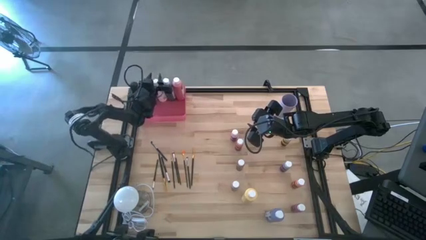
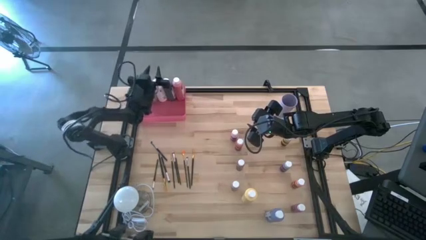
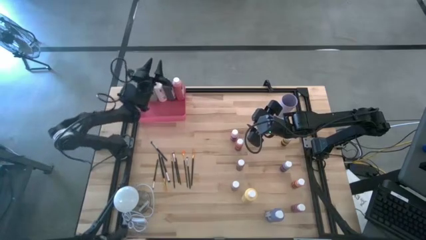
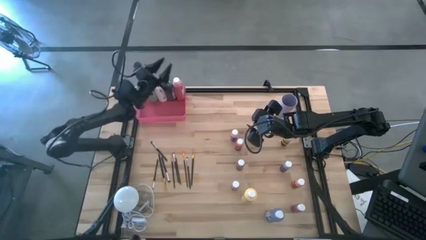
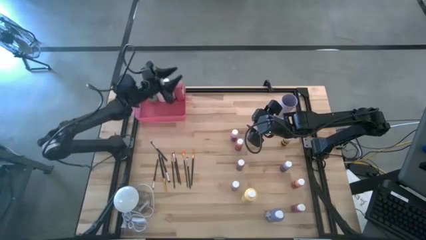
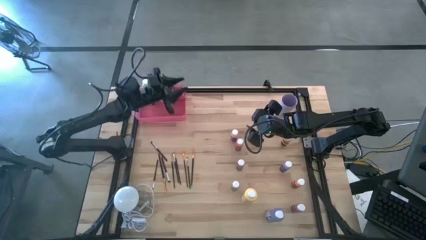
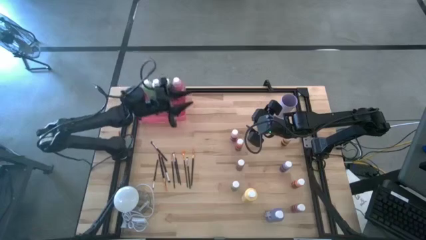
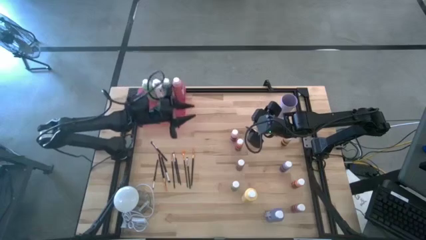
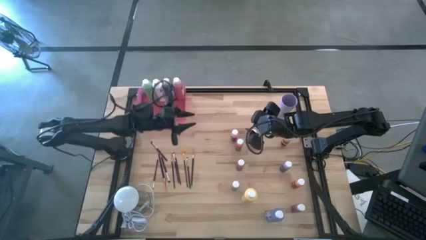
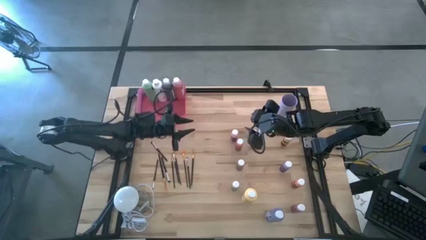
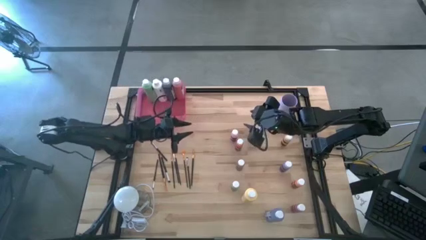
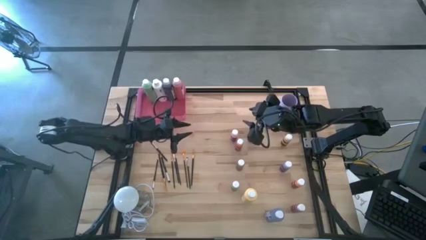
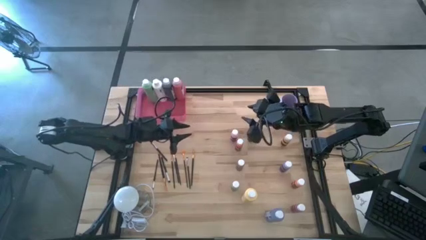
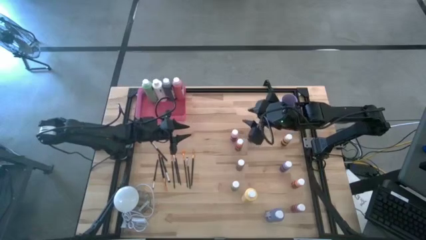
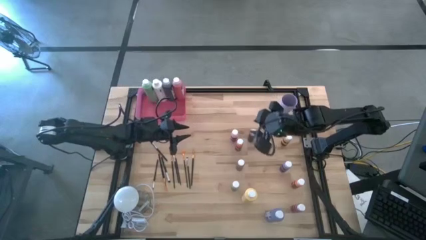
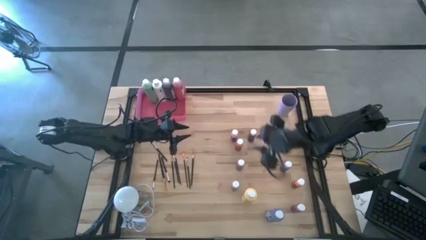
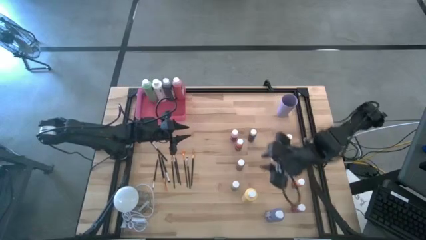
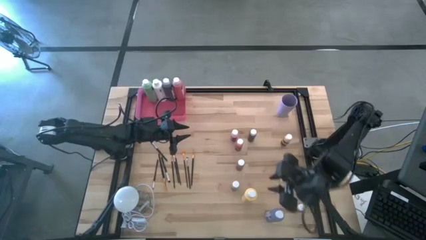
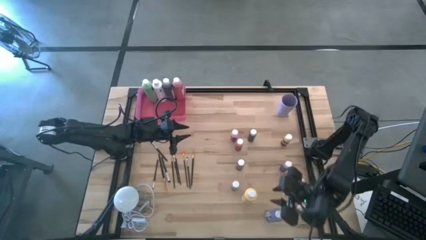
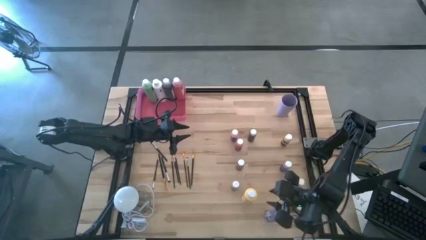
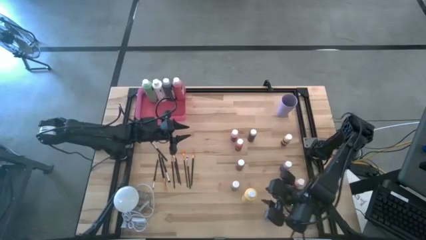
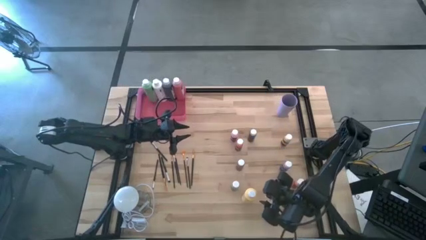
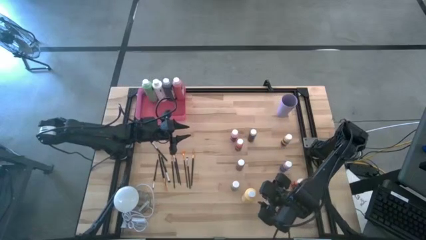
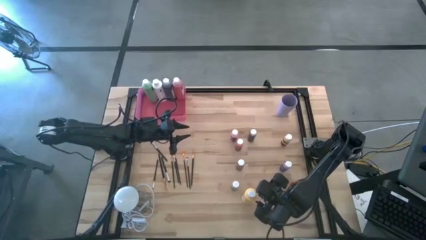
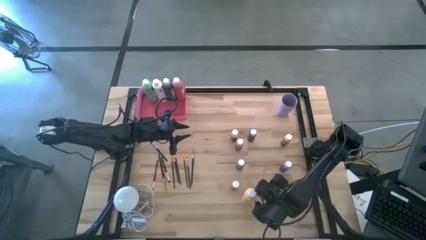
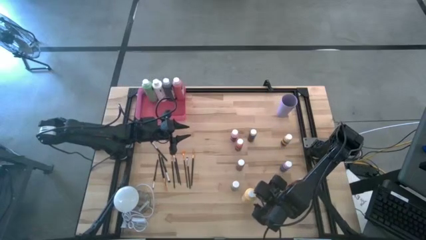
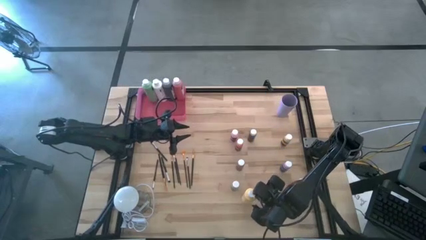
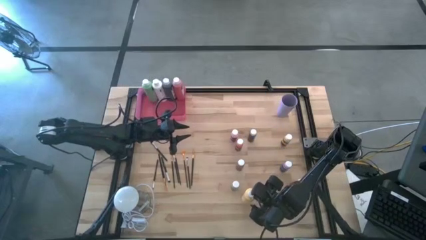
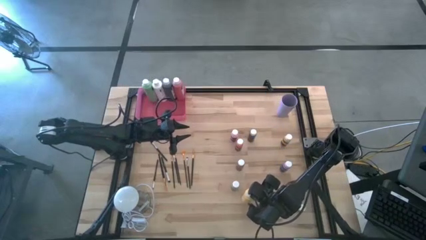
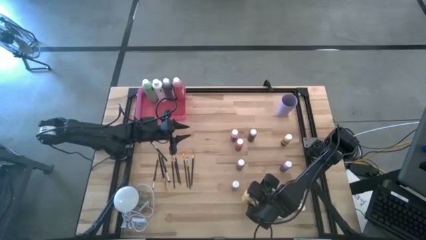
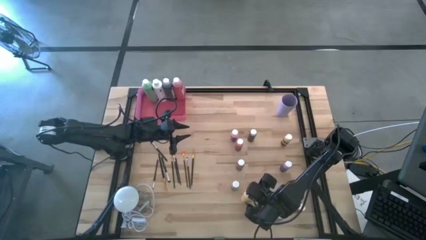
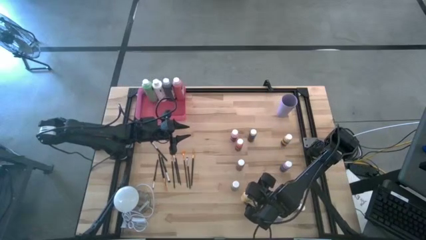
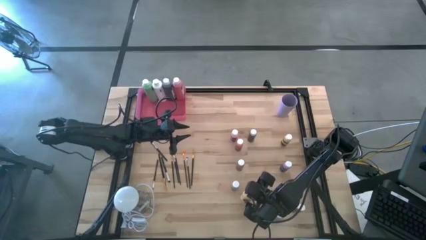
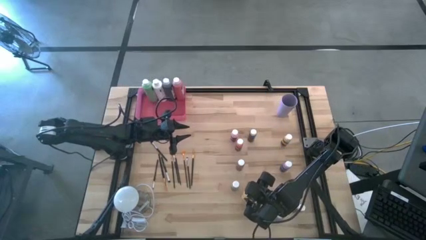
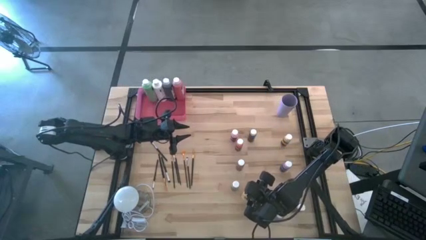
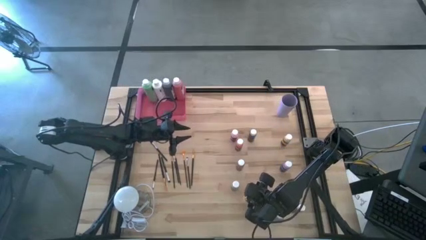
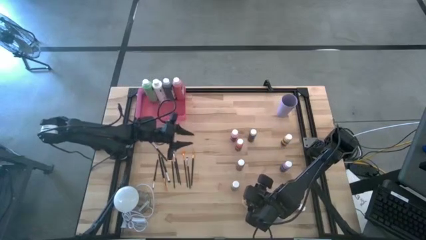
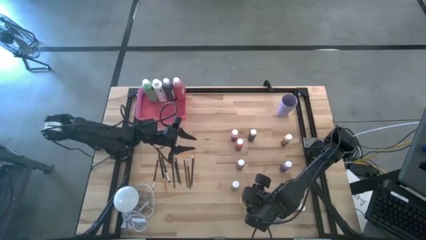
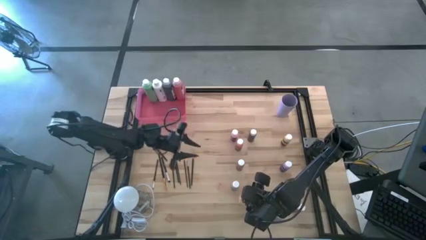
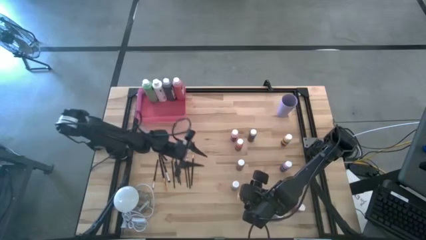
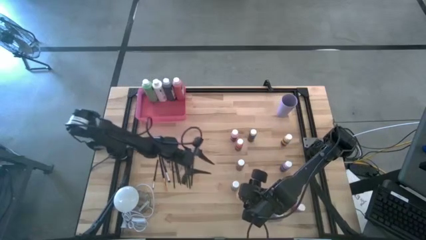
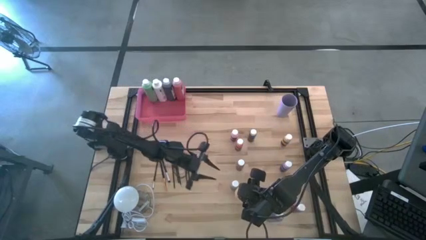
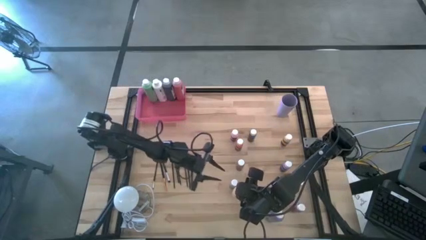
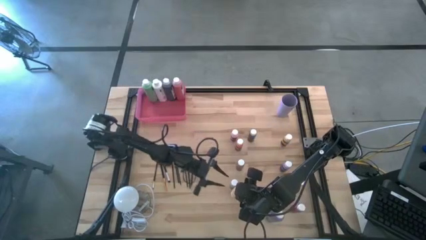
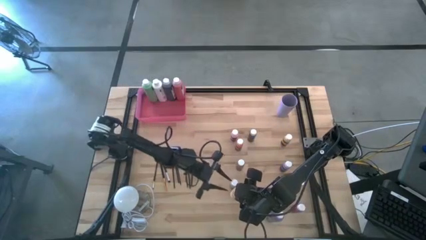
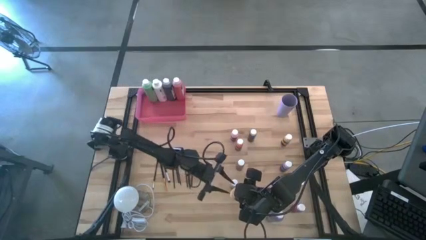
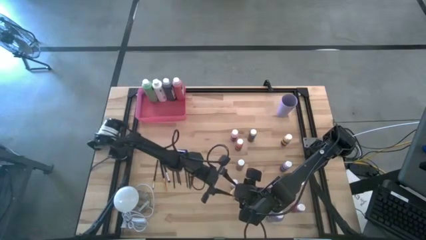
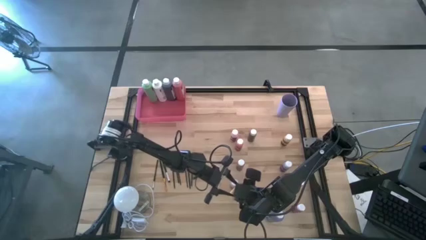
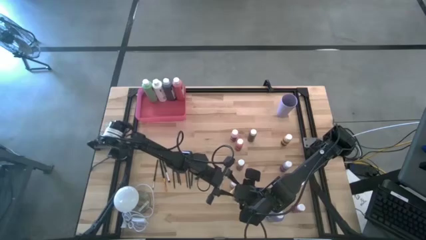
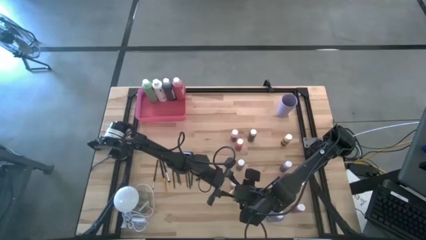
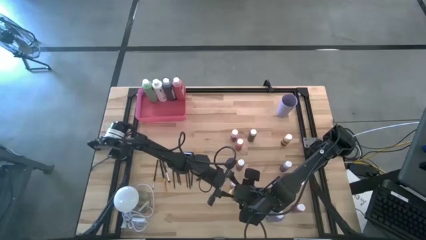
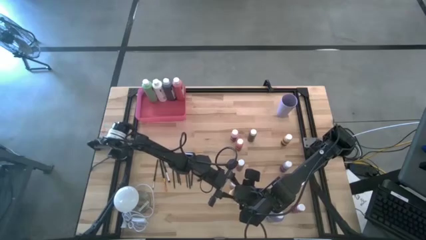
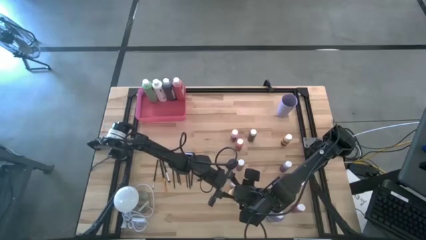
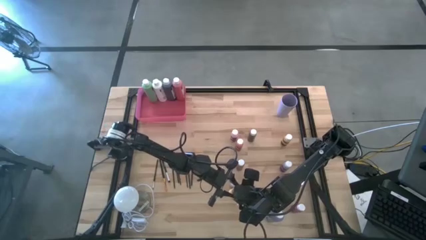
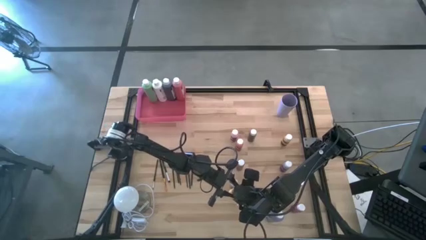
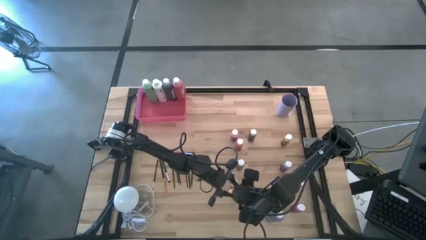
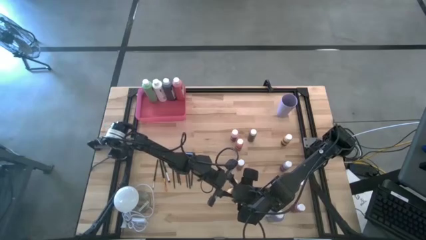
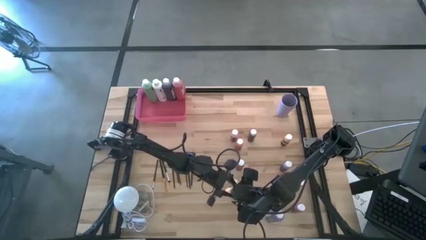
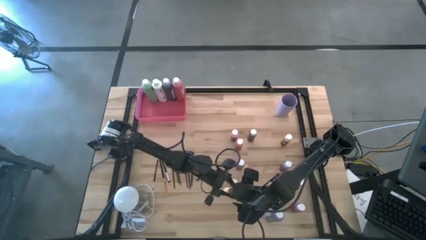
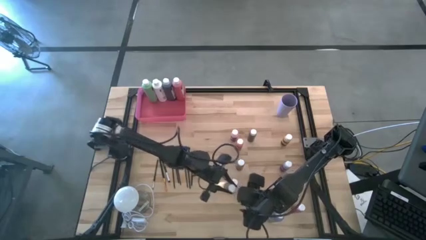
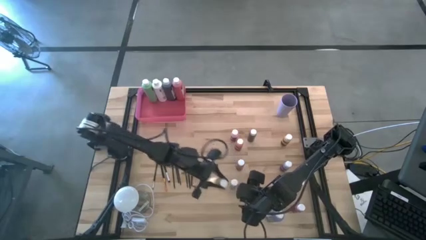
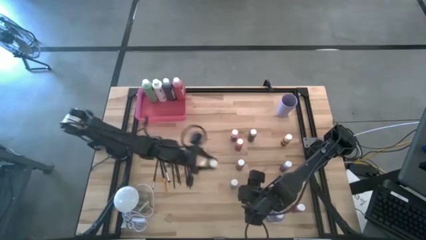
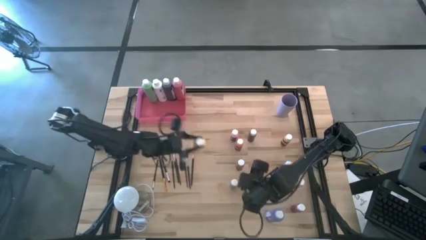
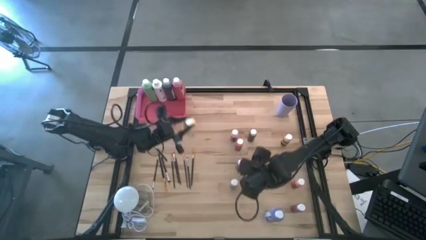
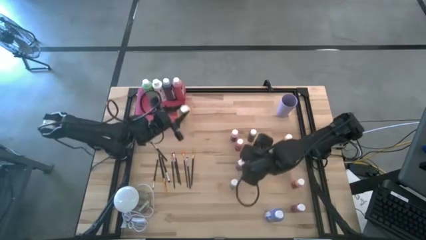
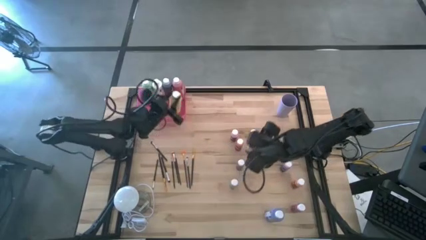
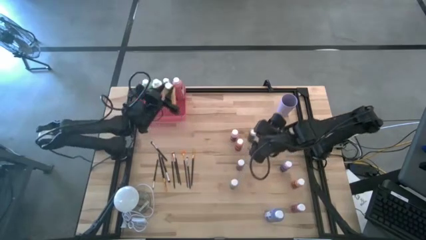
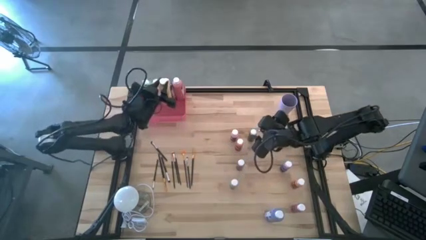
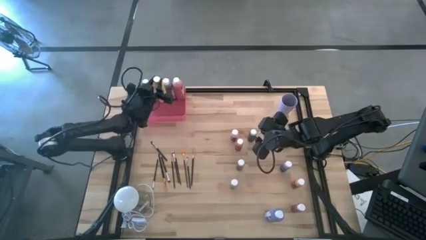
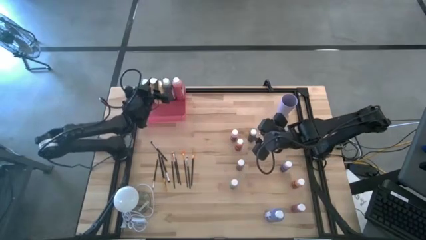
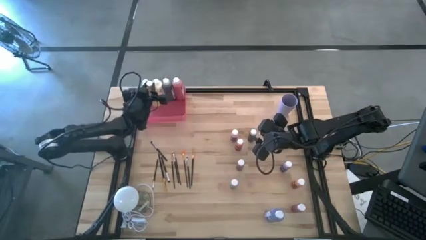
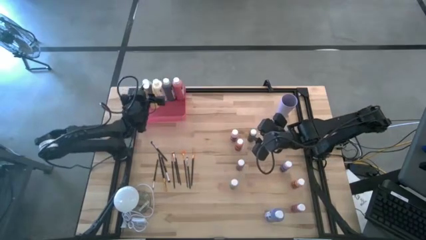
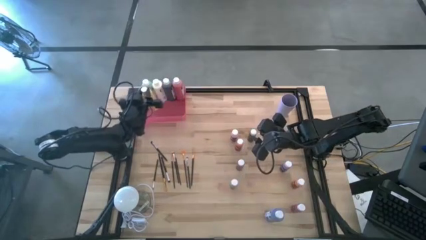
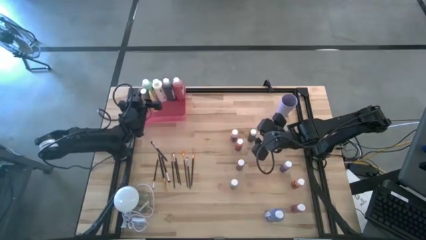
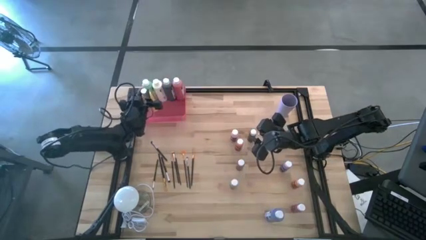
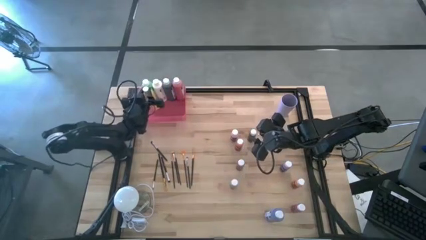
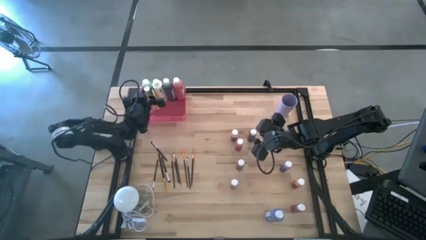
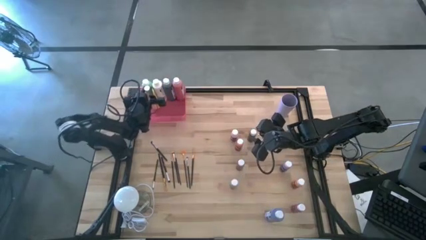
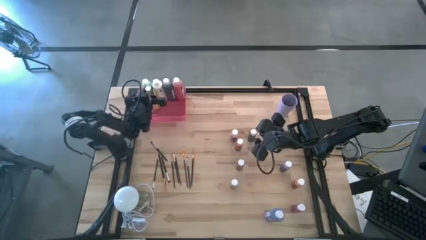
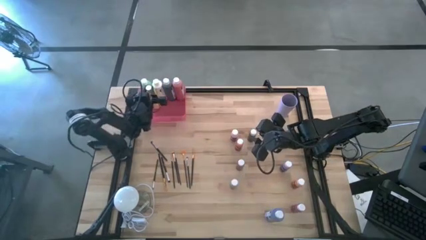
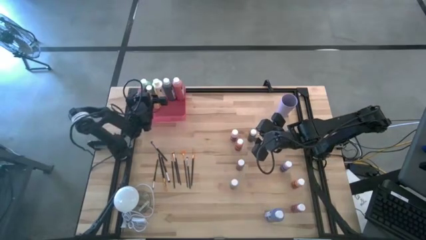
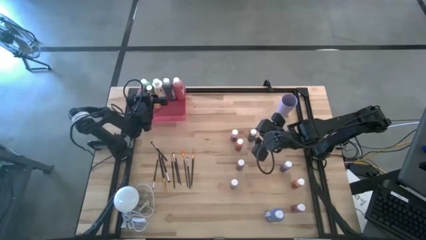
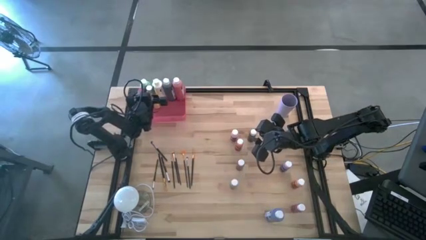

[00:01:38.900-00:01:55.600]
Task: Pick & Place Paint Supplies
Put the large yellow paint bottle into the pink bin
